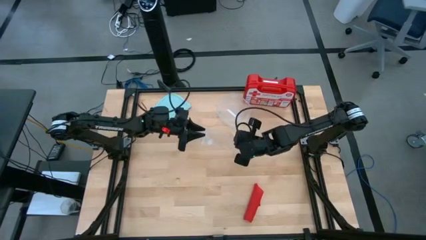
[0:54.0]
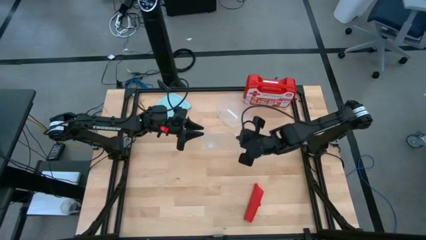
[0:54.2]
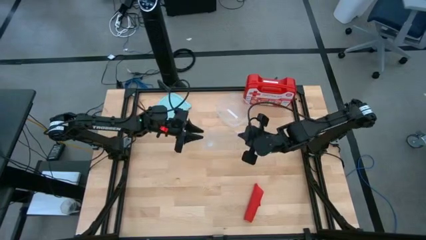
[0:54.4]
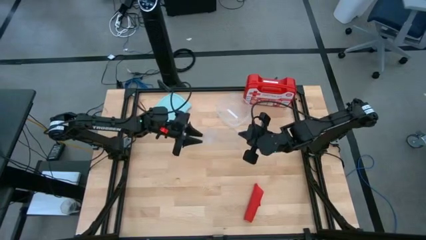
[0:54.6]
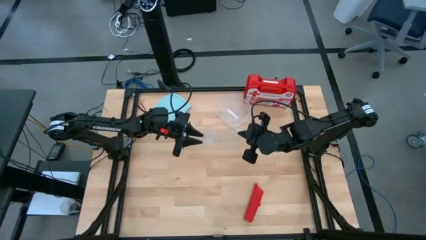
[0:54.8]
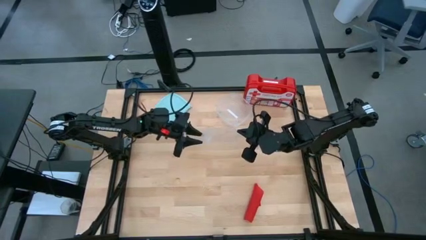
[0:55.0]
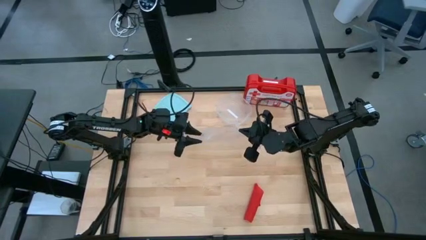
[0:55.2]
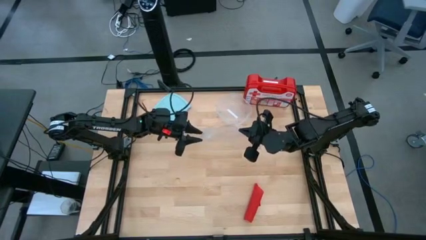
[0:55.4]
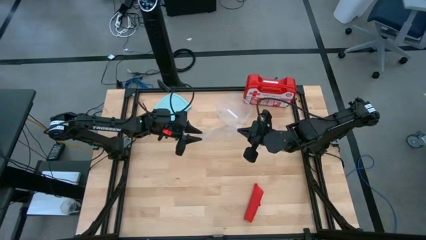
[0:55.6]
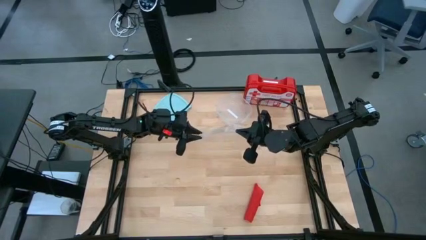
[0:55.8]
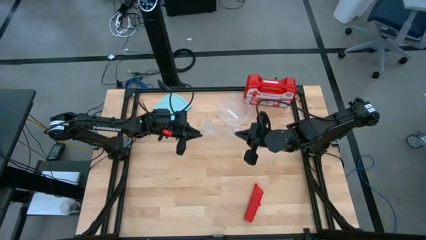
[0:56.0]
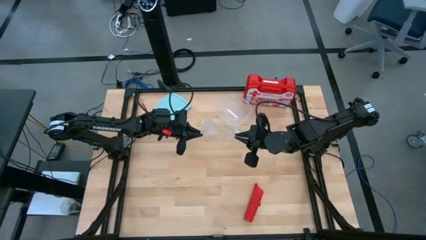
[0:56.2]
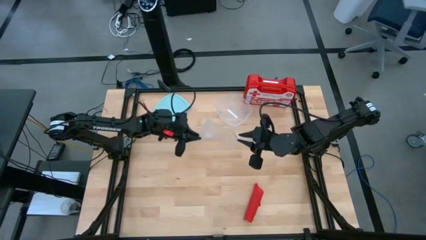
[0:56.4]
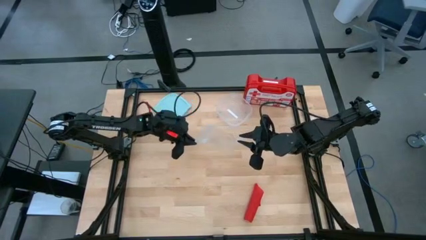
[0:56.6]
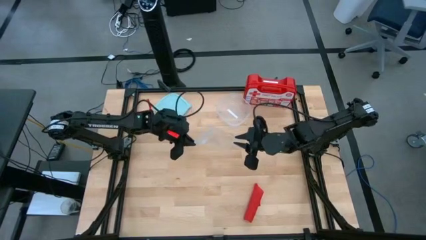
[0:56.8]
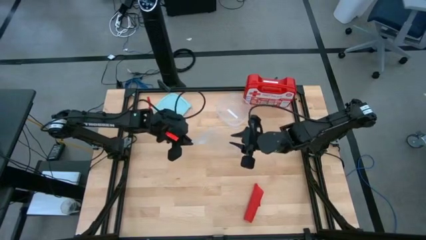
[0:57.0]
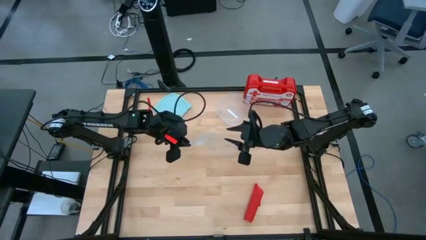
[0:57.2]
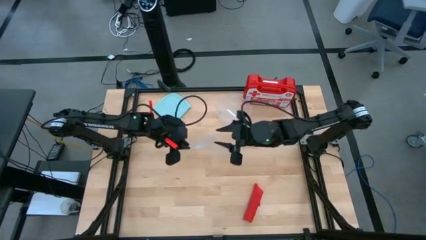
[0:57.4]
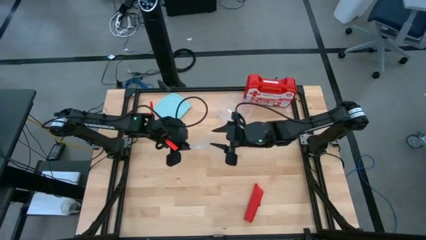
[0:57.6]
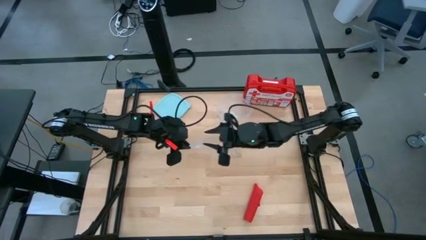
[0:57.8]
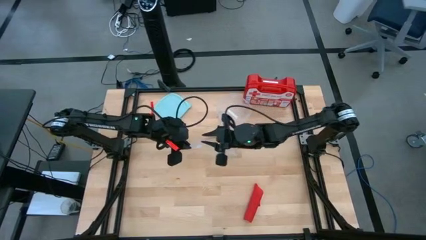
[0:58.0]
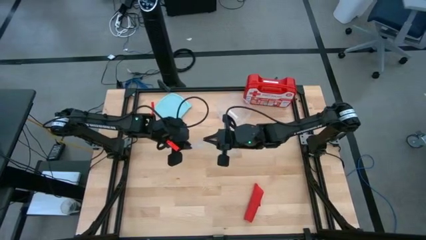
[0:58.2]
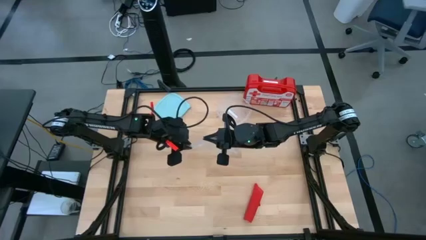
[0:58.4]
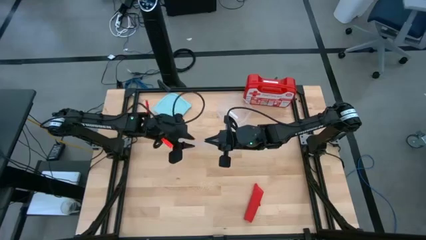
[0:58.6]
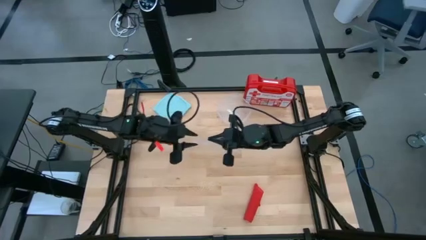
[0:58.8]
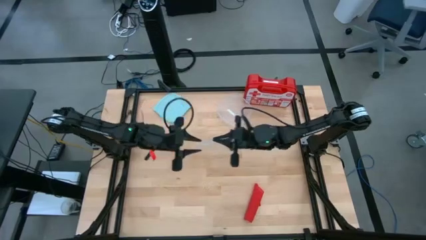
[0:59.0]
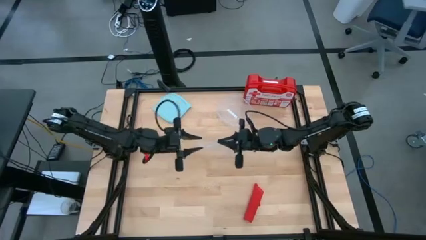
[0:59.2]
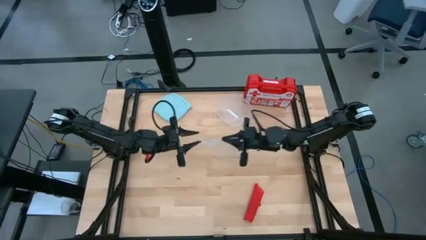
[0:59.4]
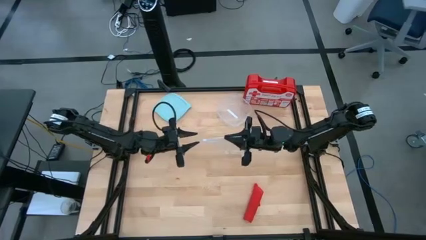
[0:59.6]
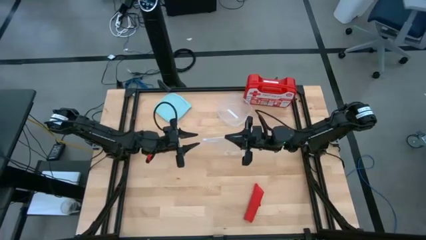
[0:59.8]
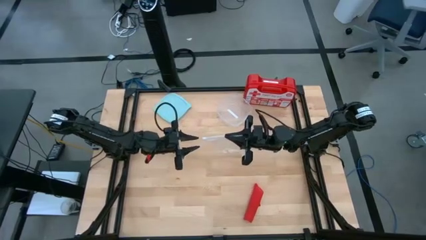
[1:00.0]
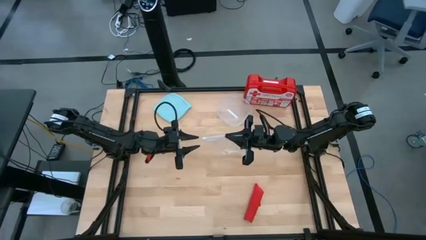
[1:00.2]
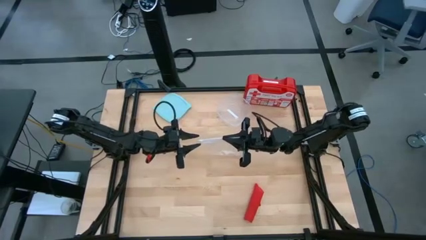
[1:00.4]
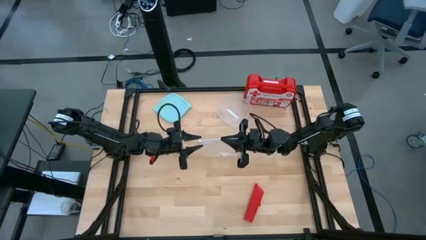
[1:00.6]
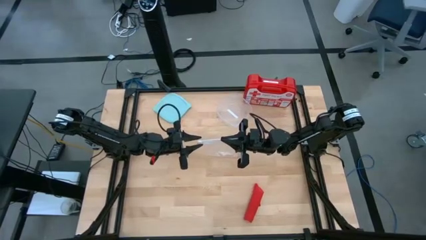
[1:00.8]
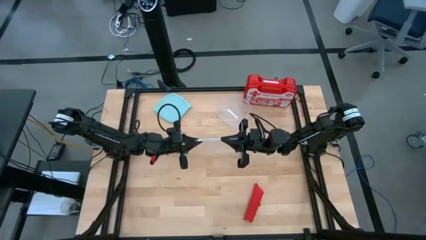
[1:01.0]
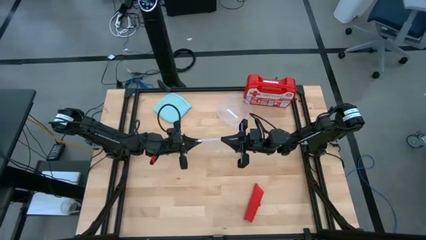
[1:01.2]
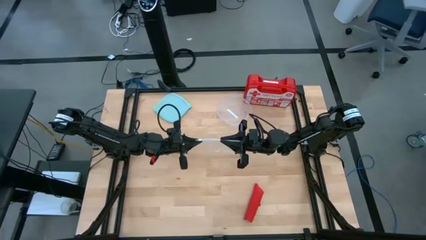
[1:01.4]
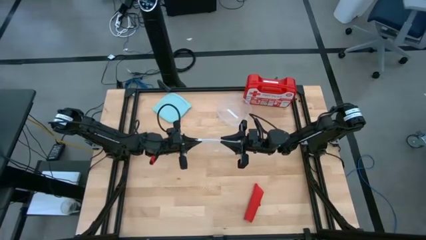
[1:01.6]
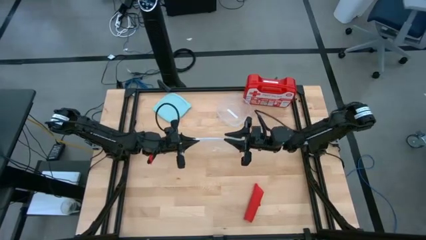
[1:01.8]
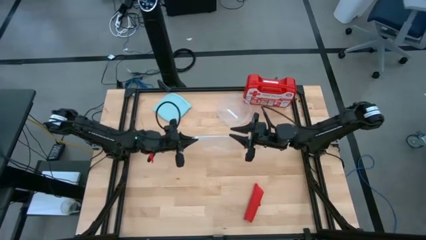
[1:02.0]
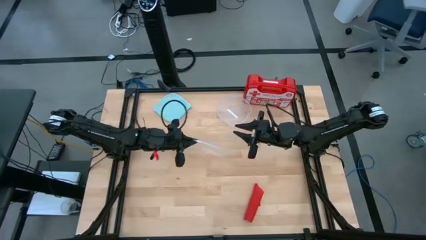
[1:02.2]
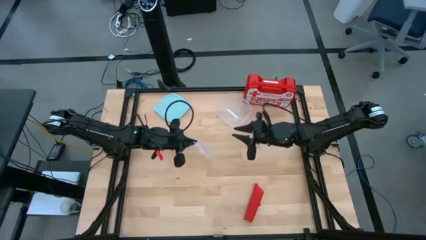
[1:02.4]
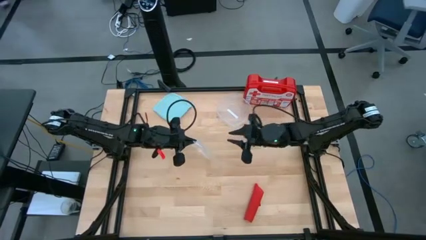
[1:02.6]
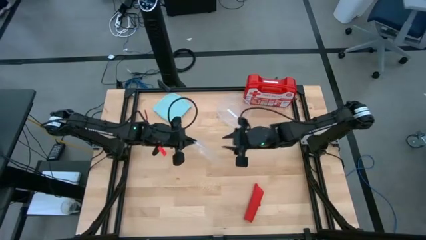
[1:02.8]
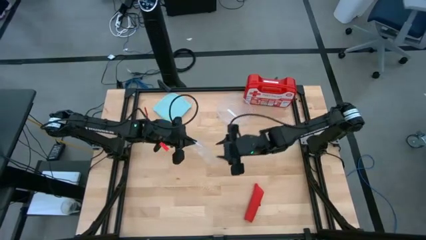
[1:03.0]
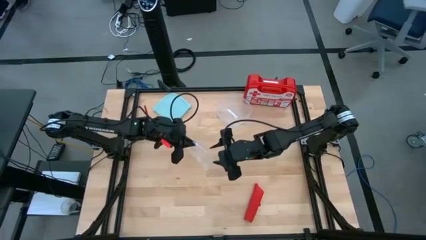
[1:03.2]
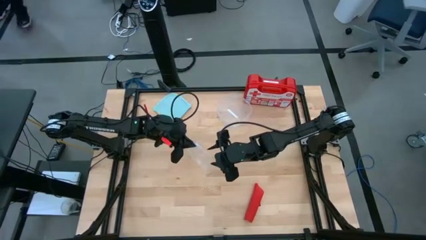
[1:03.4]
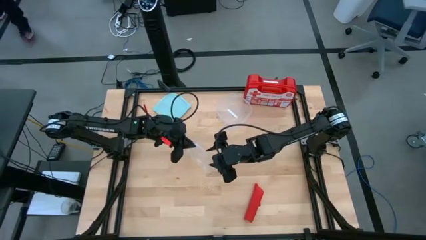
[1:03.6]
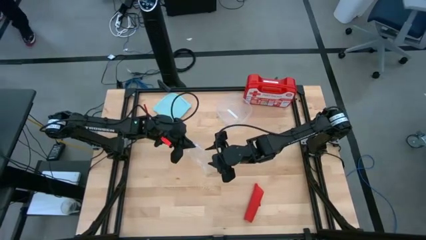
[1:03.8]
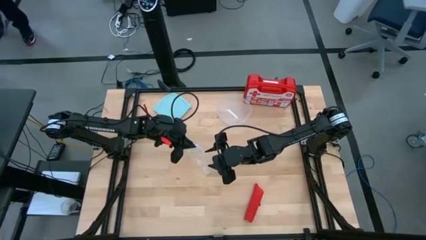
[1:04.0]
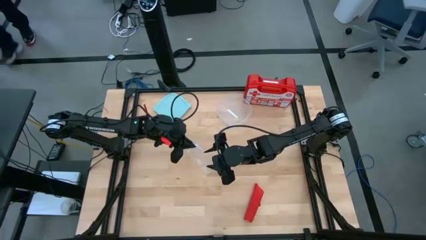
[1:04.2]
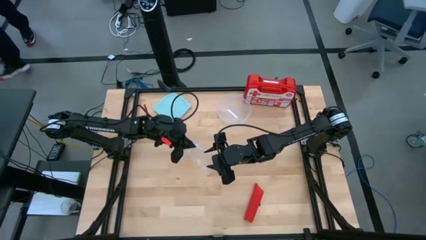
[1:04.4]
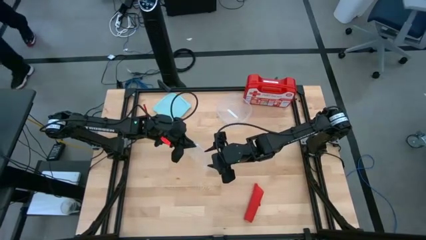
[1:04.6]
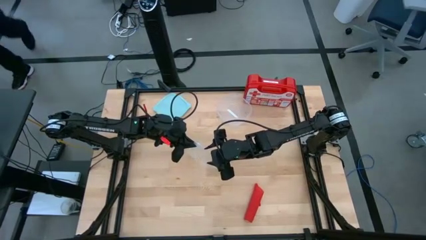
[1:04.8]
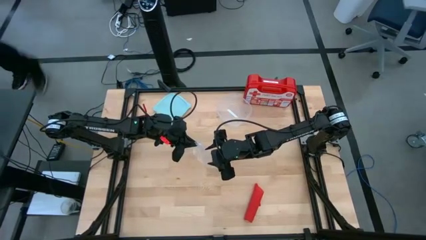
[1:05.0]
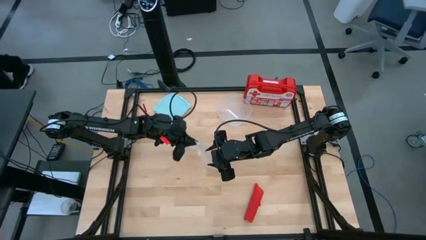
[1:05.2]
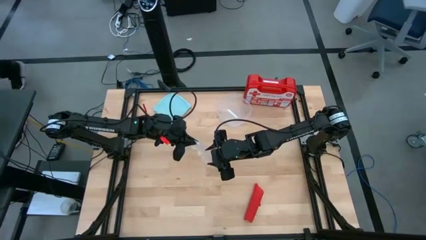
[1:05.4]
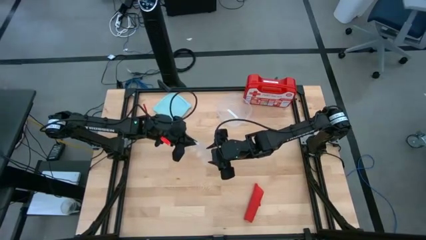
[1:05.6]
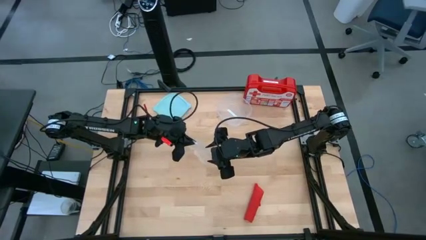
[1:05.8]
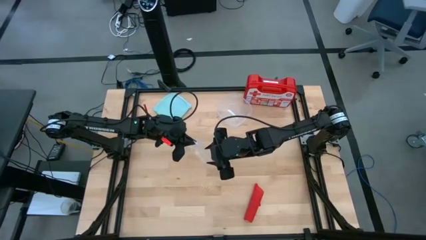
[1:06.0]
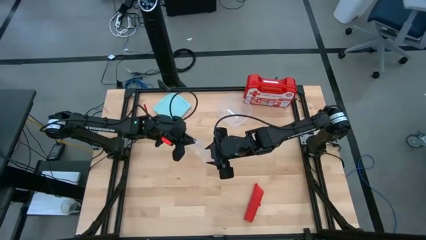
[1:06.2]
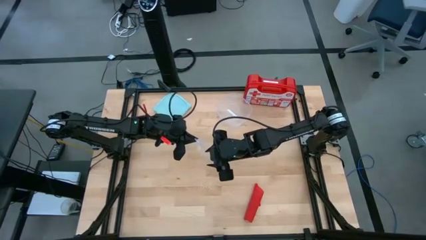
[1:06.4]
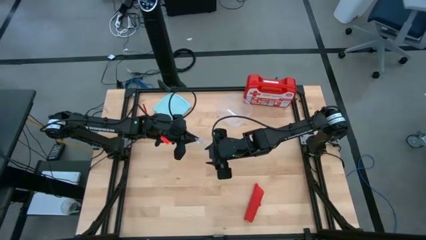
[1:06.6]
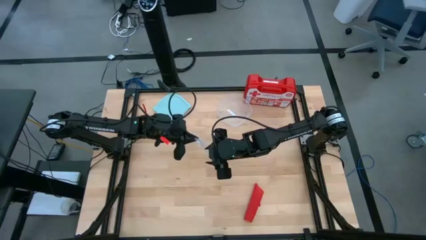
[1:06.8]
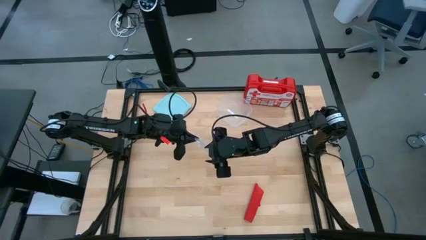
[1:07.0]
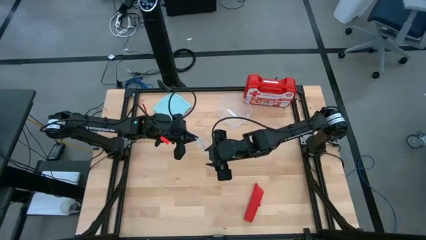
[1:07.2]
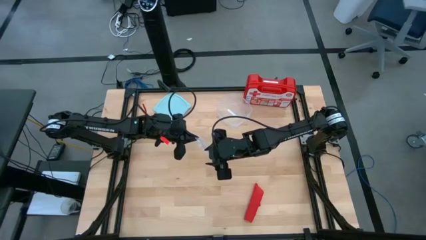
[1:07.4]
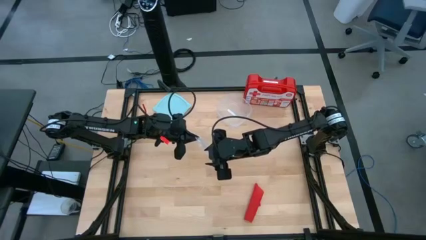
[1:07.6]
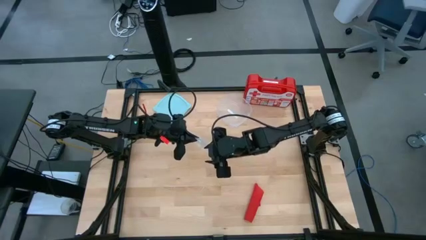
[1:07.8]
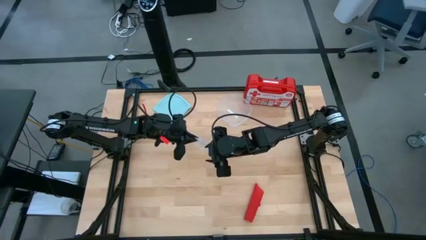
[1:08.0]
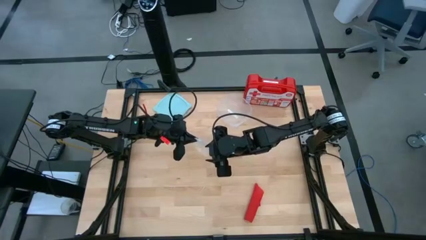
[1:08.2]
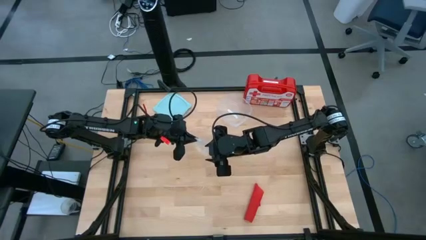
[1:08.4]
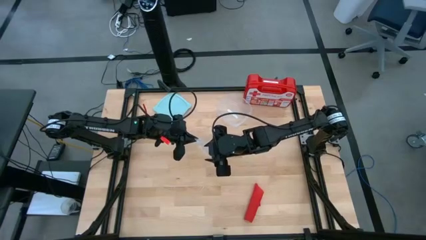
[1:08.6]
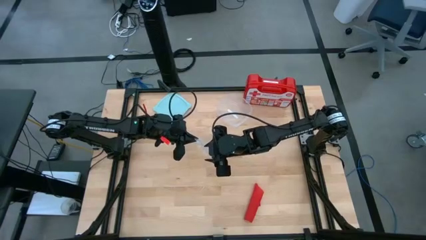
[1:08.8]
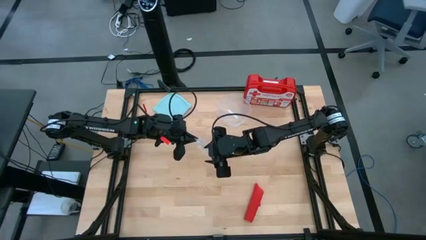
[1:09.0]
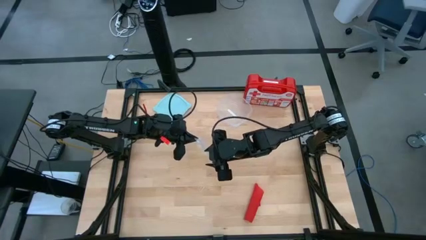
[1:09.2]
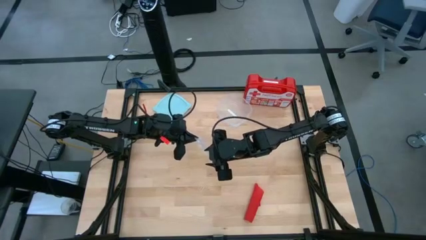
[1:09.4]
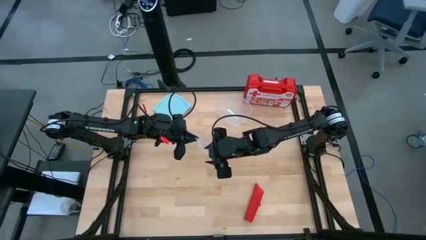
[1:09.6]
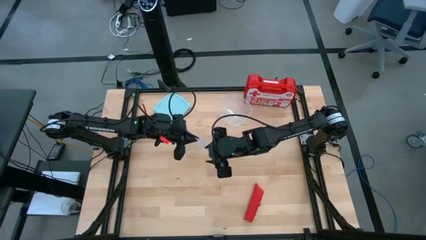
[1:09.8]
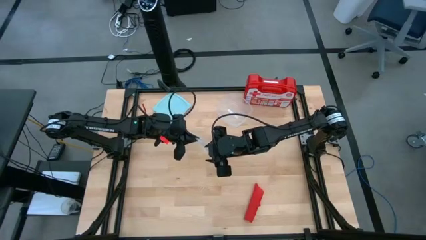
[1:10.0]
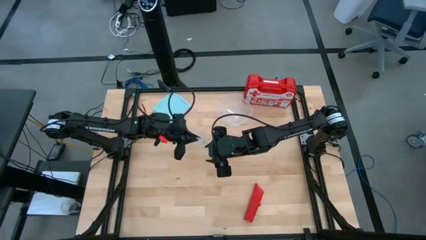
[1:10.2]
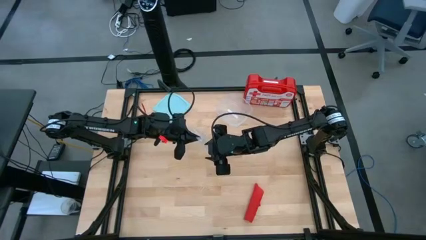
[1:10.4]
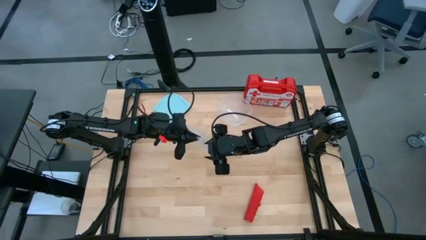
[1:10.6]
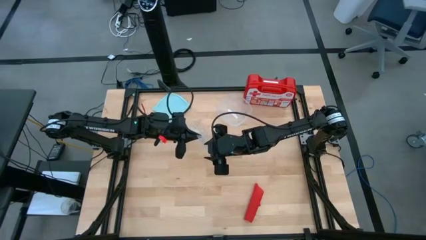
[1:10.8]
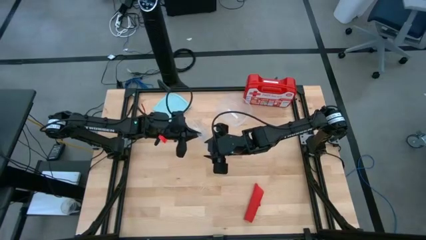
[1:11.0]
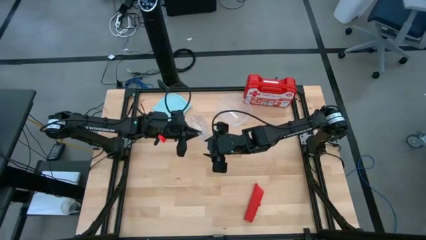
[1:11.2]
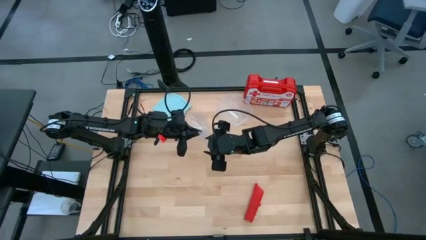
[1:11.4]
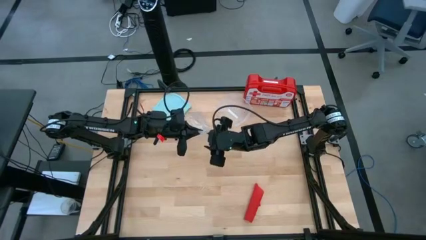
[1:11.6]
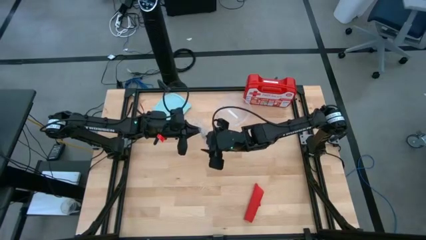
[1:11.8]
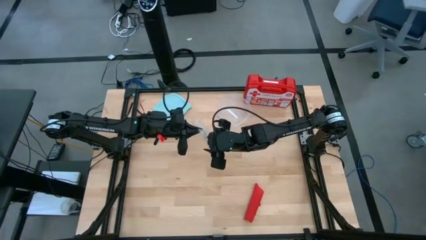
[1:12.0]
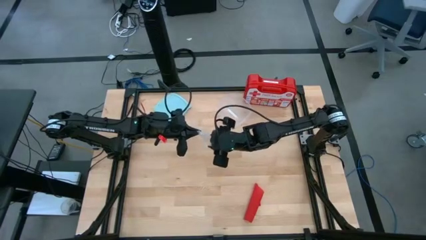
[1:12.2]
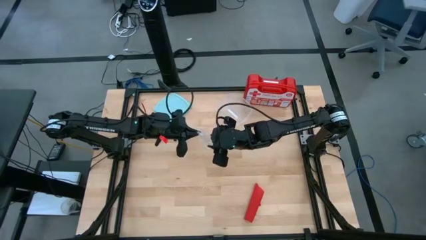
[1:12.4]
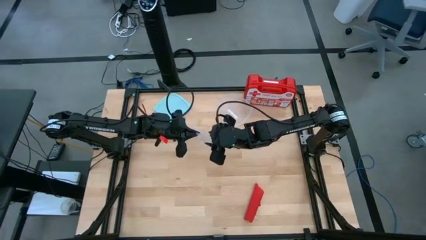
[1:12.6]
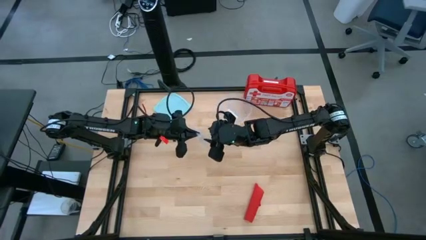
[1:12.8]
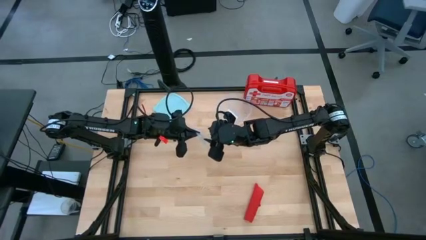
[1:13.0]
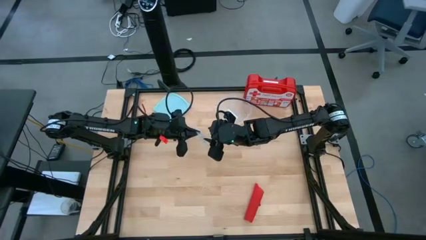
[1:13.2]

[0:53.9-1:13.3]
Task: Roll bandage
Open the transparent zip bag
